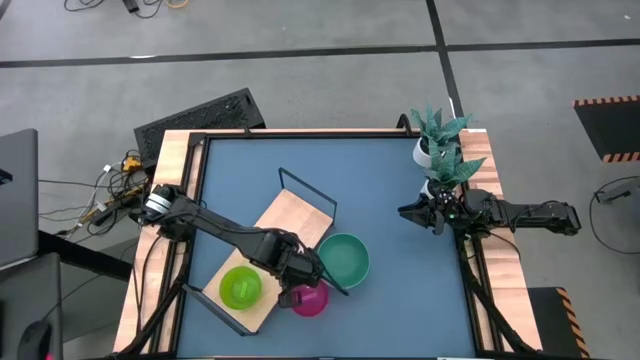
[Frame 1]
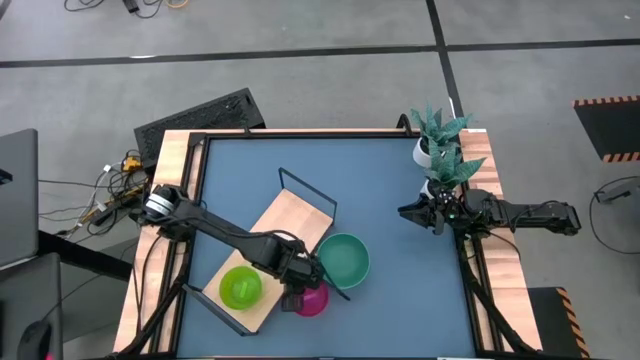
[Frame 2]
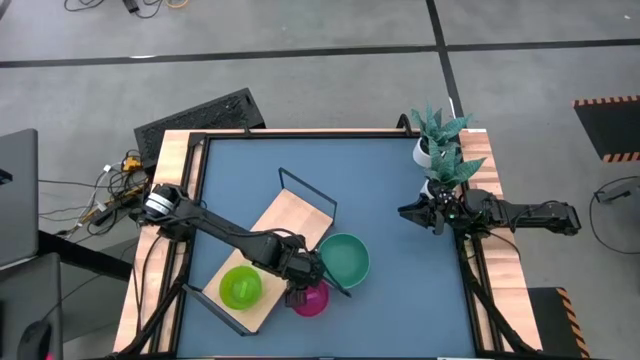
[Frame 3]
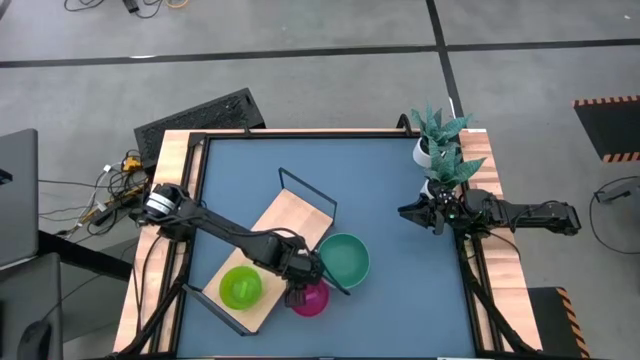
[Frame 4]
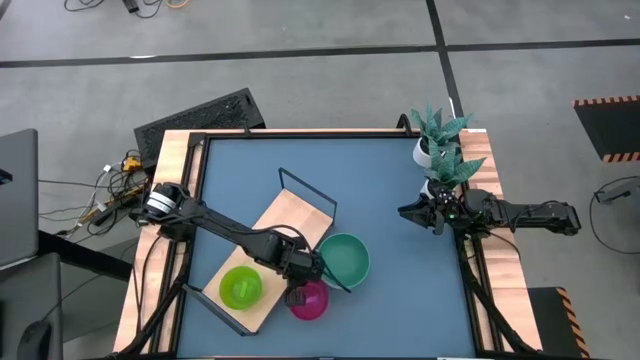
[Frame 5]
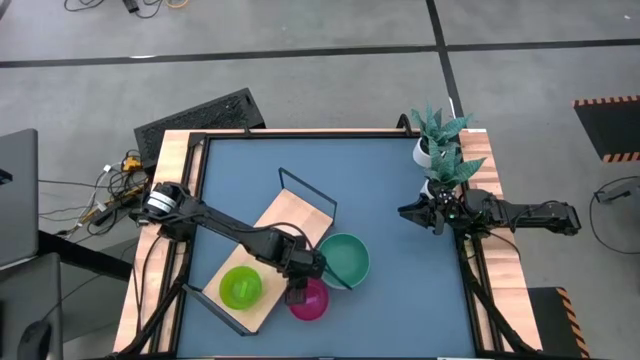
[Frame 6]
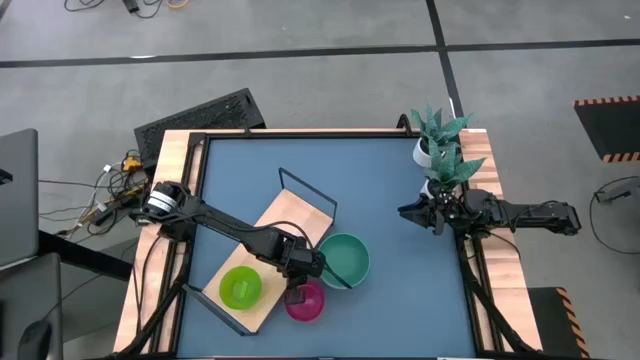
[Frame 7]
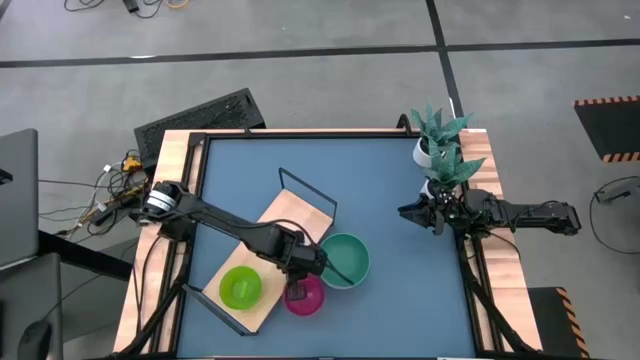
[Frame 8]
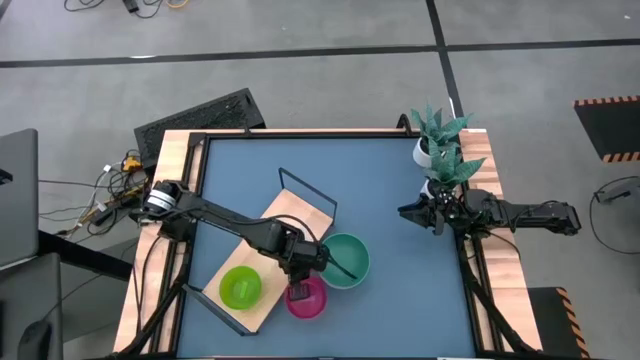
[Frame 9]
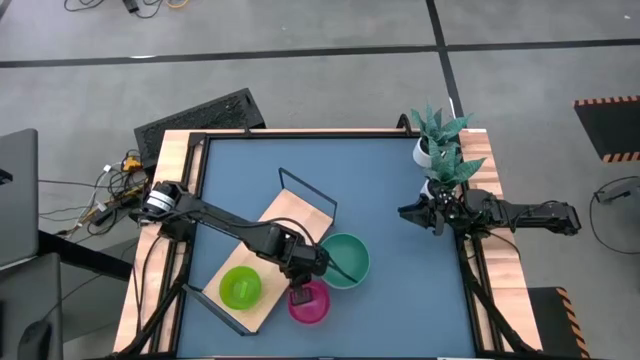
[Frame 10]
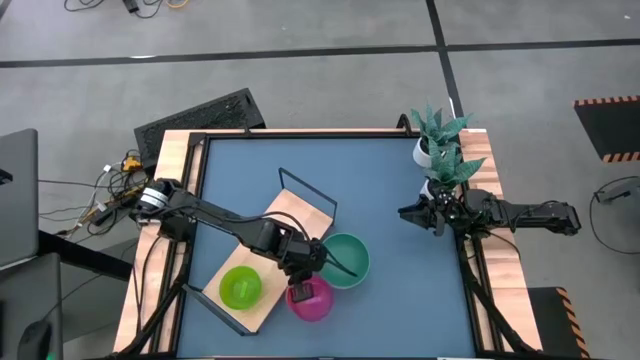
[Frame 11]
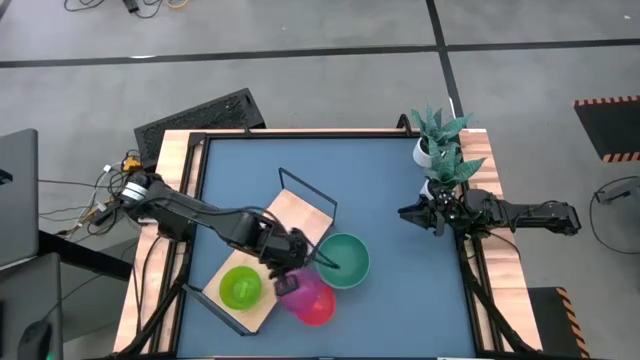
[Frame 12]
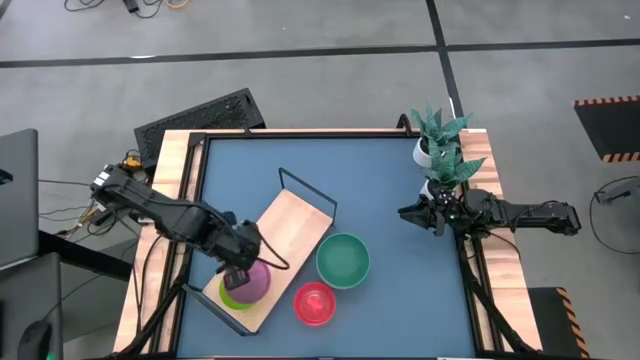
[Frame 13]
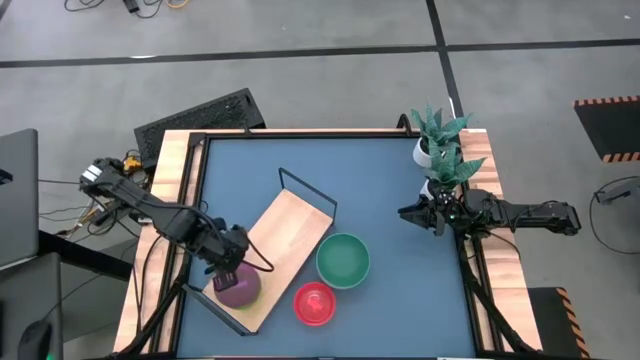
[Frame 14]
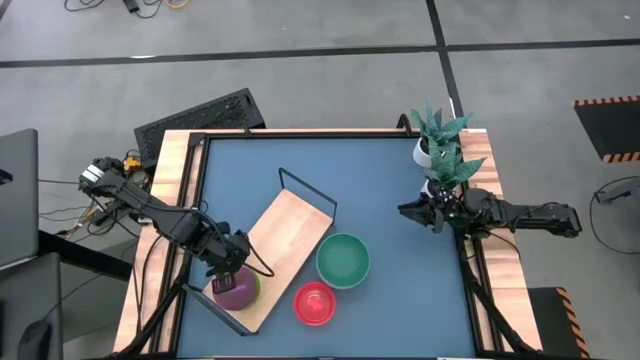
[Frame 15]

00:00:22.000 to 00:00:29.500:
Task: Place and stack bowls onto a shelf
Stack the small violet bowl on top of the green bowl on the shelf

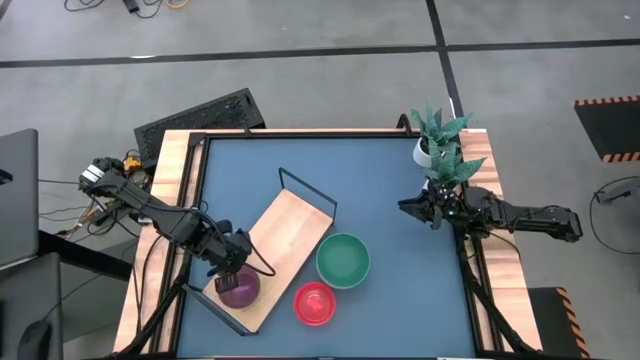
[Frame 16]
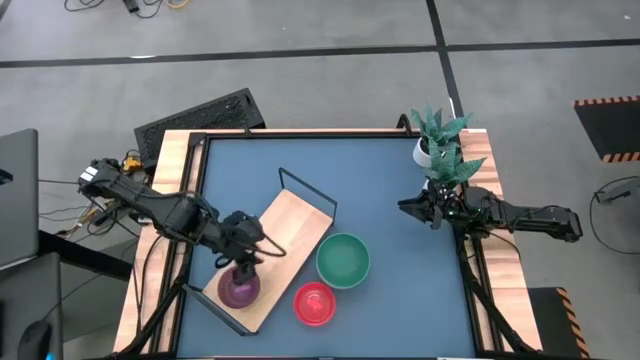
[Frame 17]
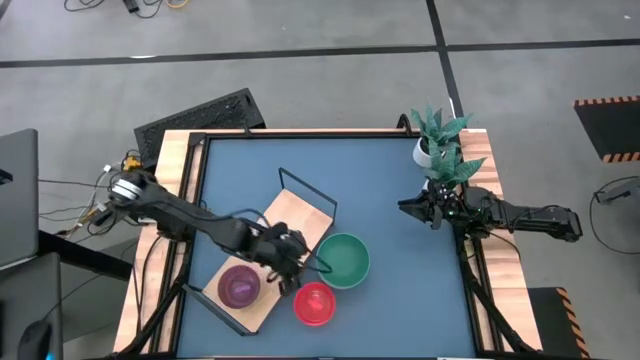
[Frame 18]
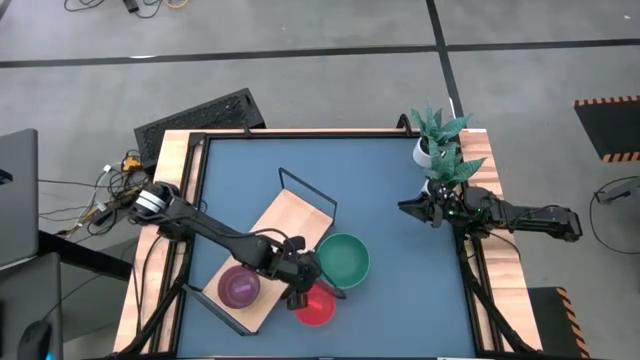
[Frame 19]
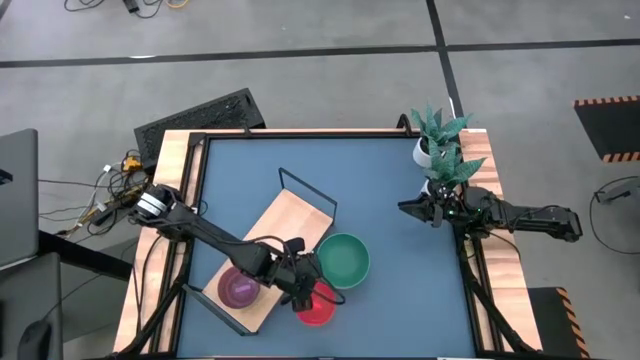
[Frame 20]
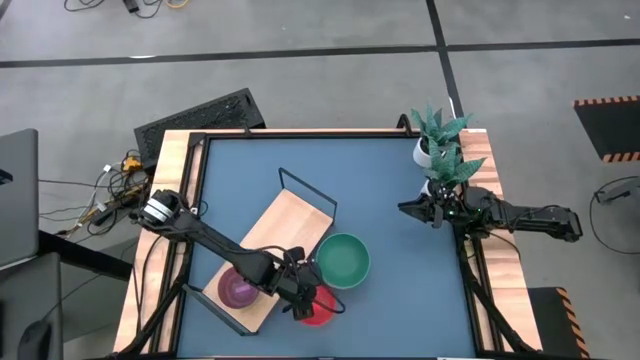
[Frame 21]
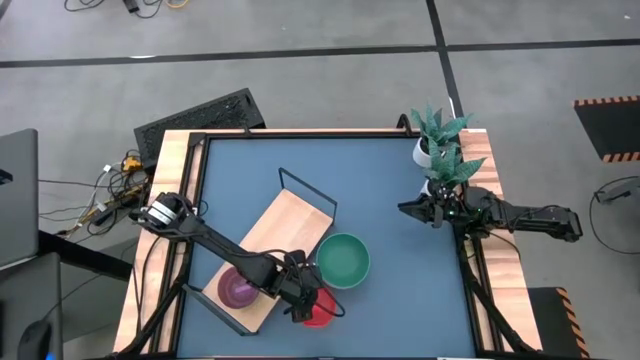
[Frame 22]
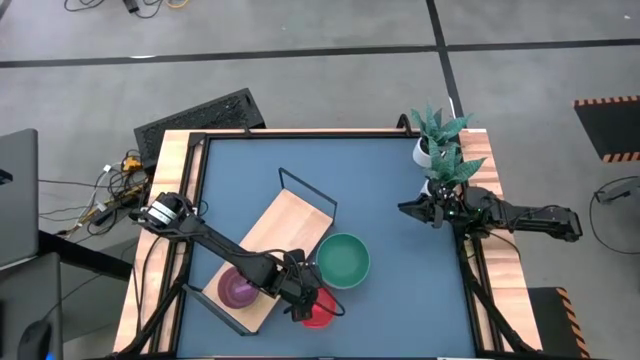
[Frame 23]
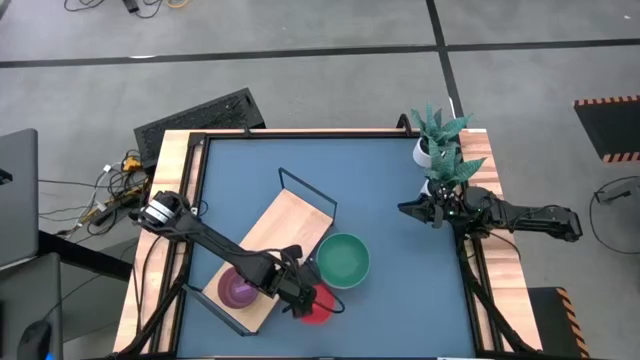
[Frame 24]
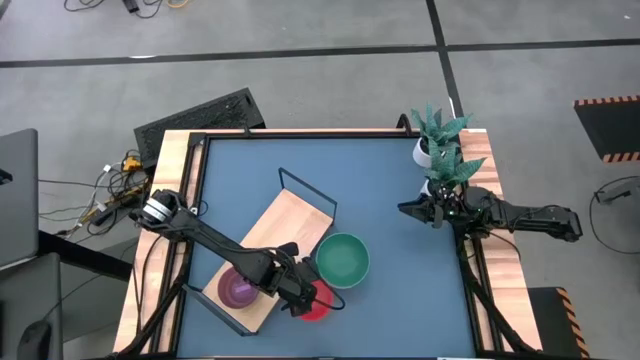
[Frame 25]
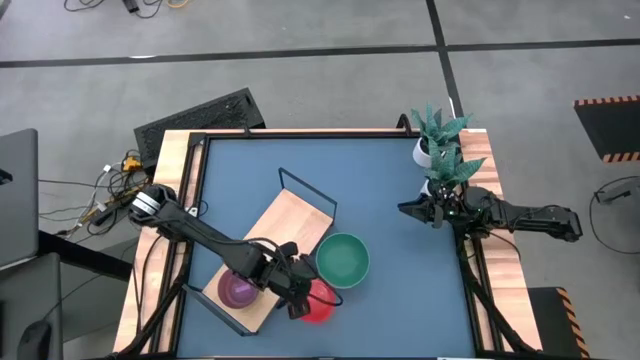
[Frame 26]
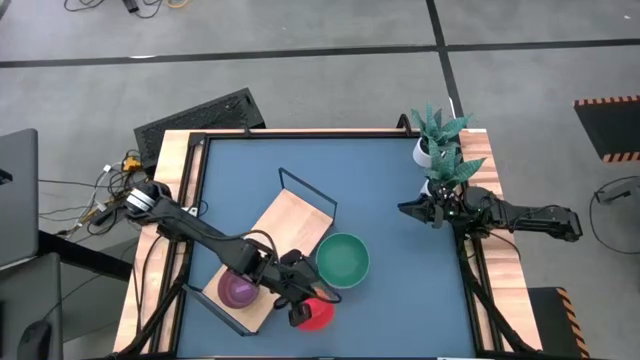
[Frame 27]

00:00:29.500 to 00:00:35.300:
Stack the orange bowl on top of the violet bowl on the shelf

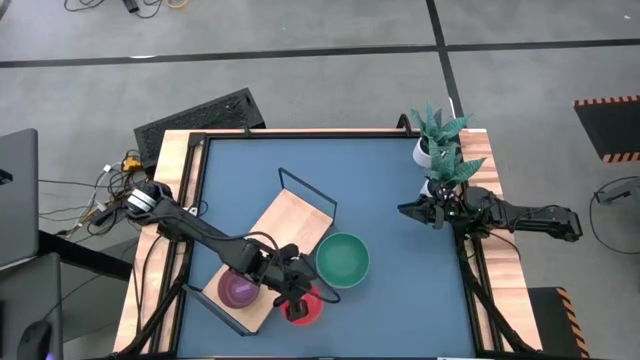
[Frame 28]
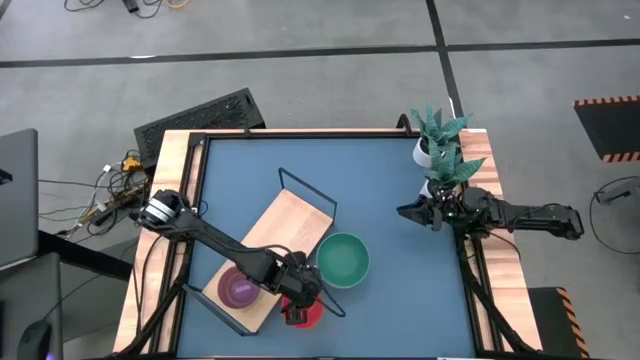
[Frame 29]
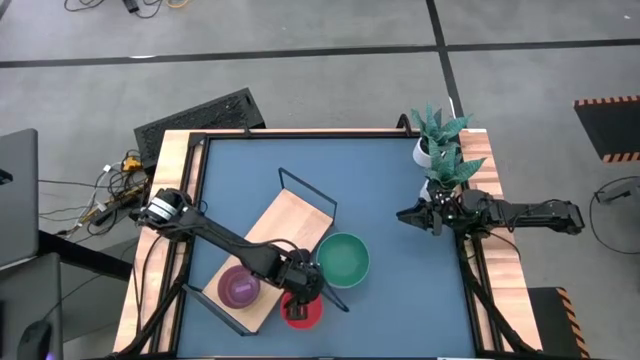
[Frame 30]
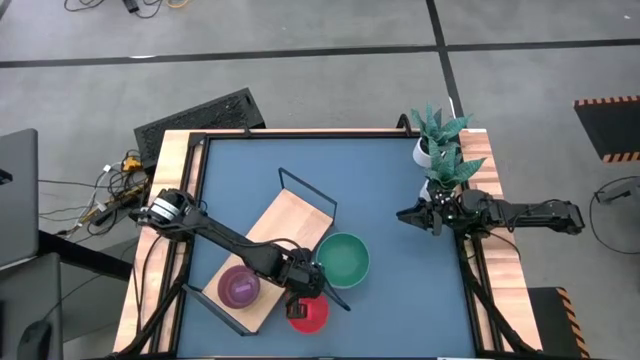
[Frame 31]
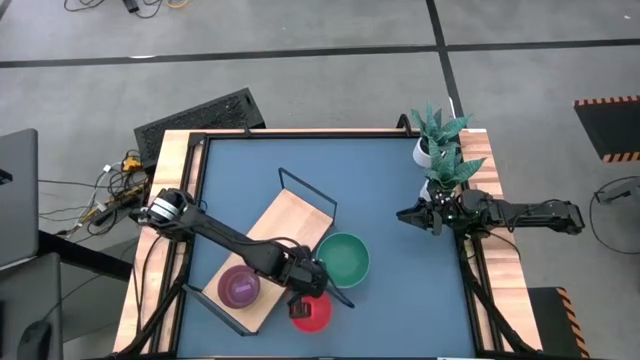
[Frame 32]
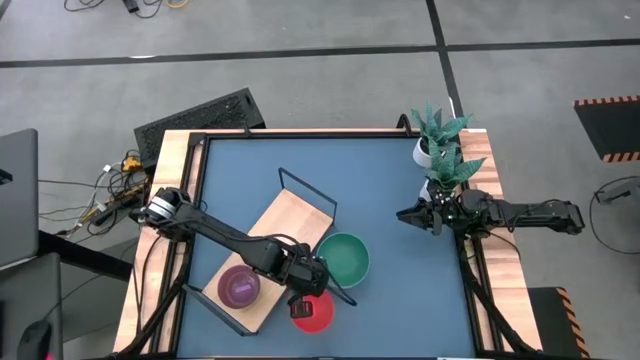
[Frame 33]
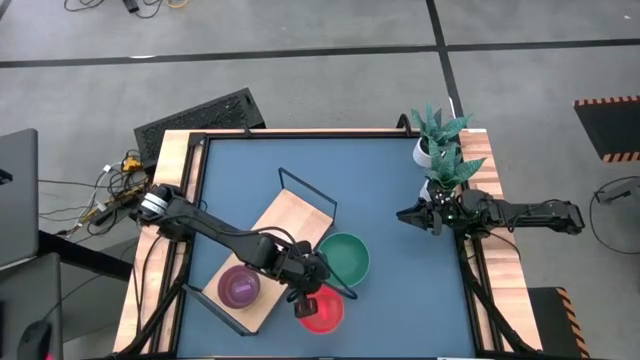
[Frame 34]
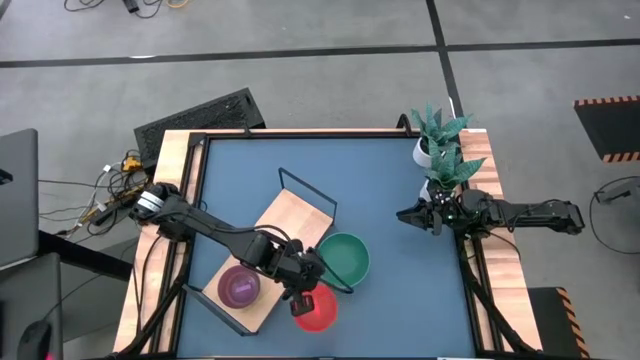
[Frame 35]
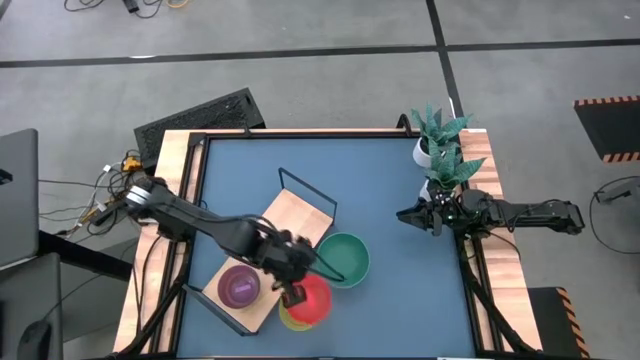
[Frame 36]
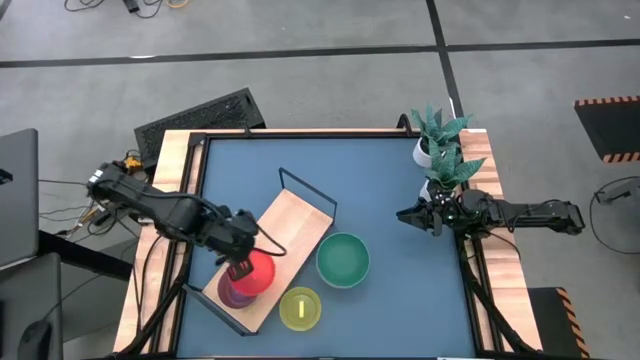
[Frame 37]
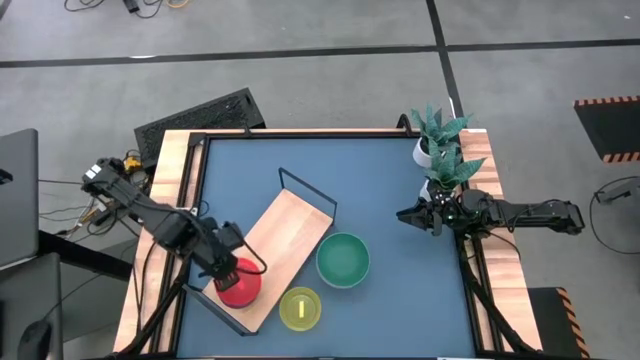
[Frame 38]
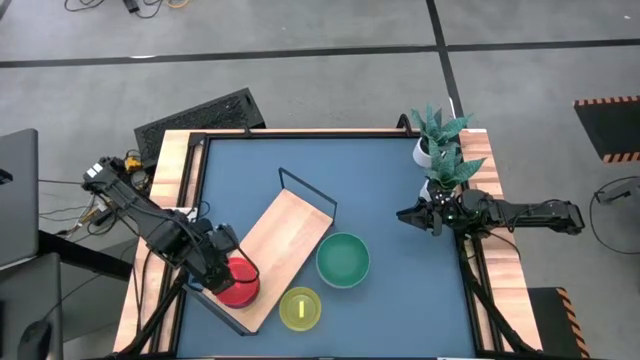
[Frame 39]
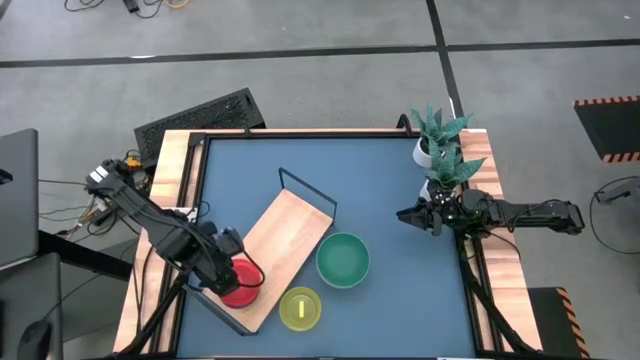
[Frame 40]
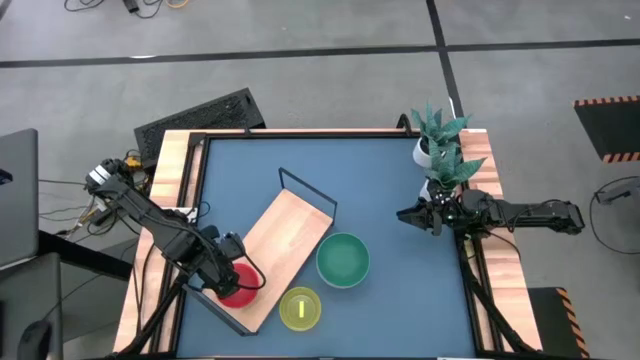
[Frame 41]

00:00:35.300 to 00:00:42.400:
Stack the orange bowl on top of the violet bowl on the shelf

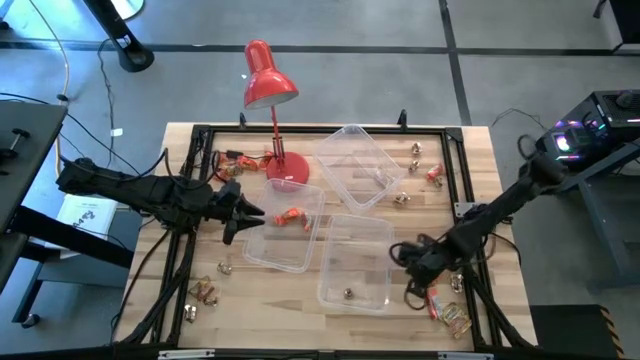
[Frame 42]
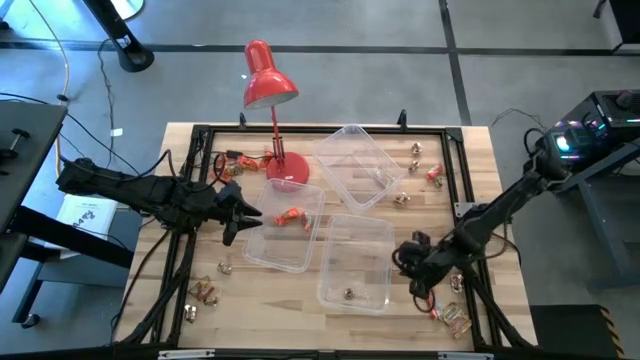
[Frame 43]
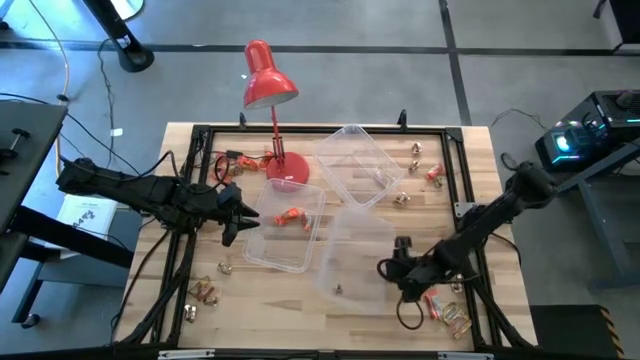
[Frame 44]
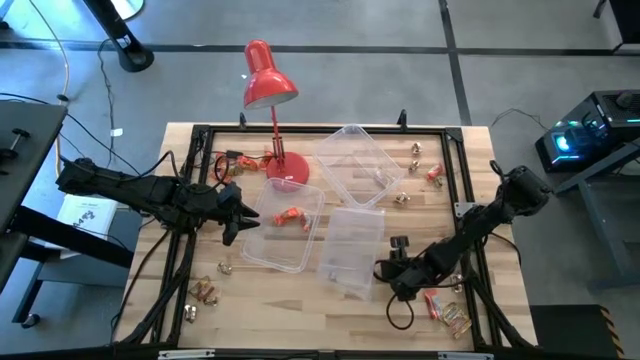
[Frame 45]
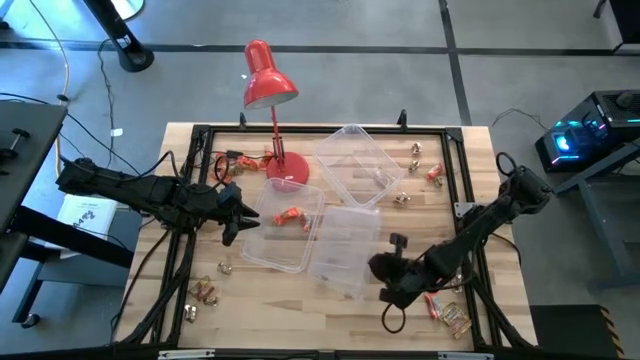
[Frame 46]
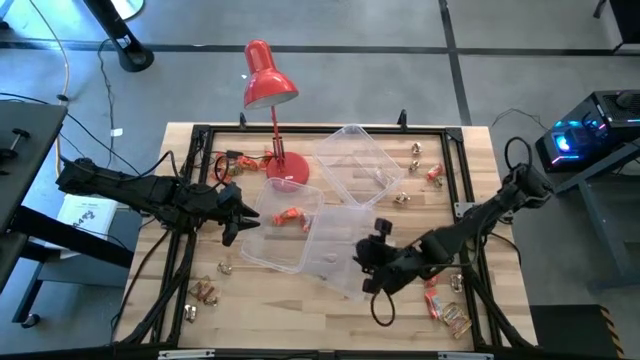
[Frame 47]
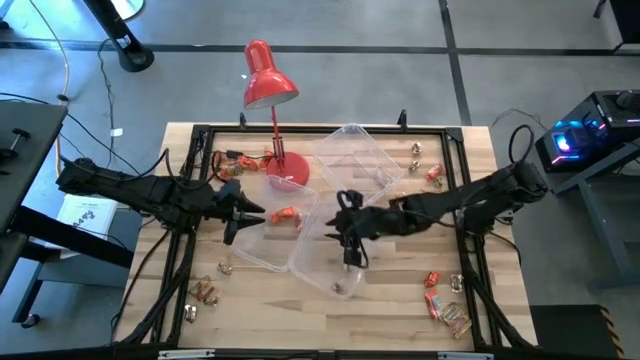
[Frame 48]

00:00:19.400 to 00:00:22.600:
Task: Sort candy
Put the gold candy into the bottom left transparent bin
